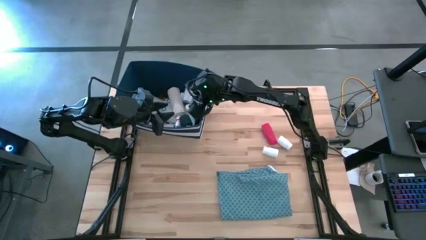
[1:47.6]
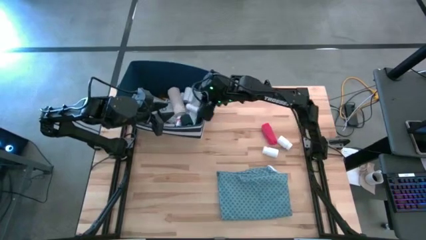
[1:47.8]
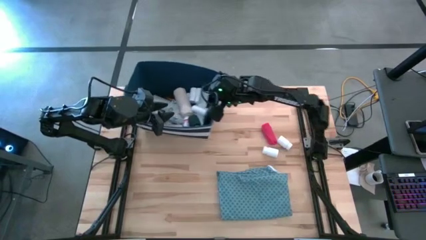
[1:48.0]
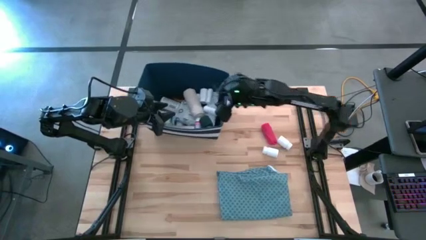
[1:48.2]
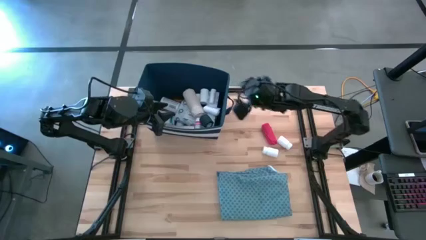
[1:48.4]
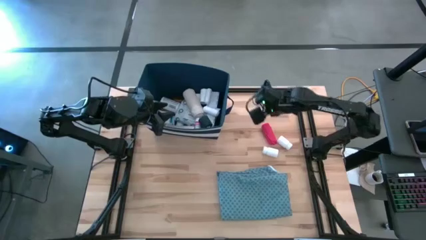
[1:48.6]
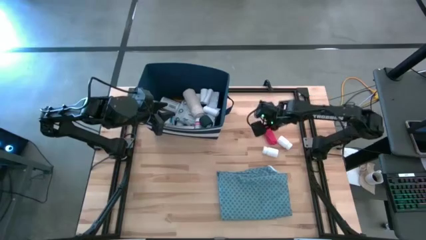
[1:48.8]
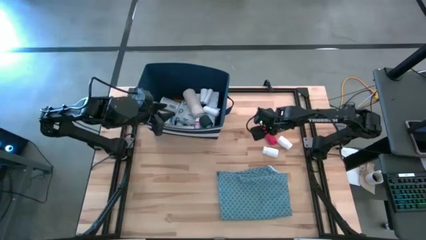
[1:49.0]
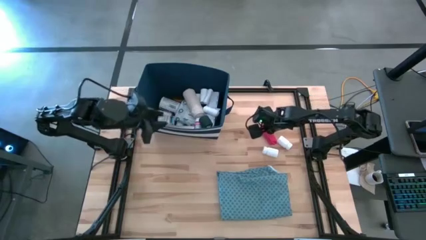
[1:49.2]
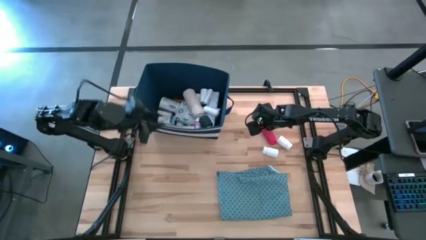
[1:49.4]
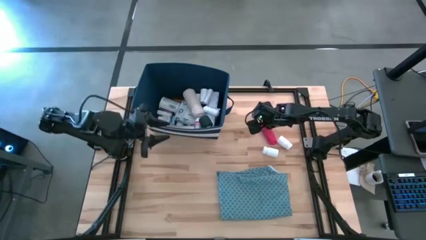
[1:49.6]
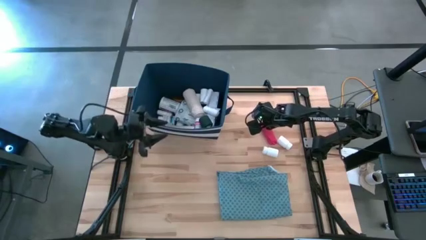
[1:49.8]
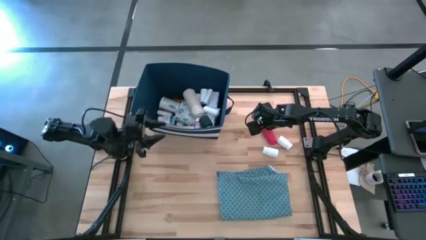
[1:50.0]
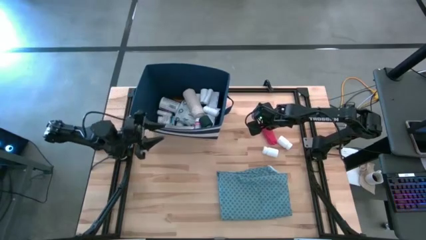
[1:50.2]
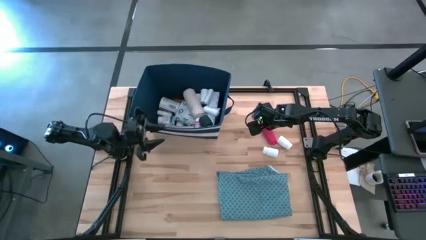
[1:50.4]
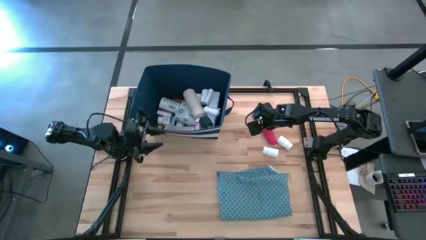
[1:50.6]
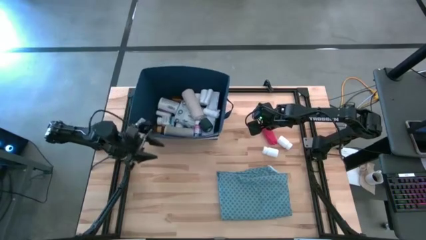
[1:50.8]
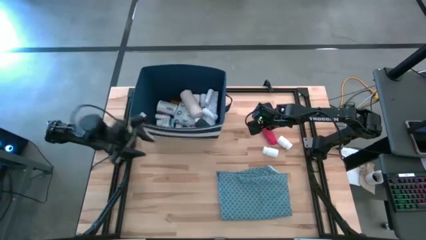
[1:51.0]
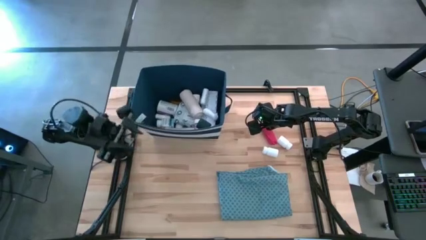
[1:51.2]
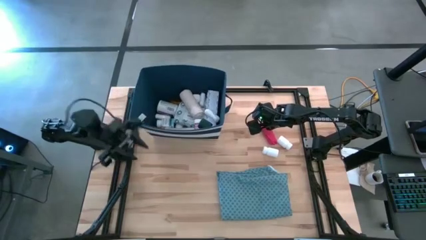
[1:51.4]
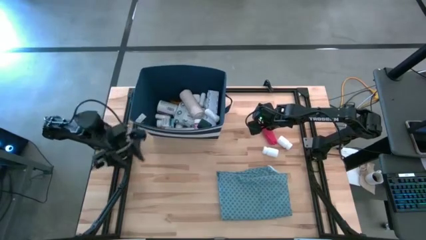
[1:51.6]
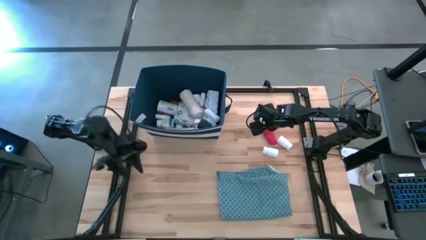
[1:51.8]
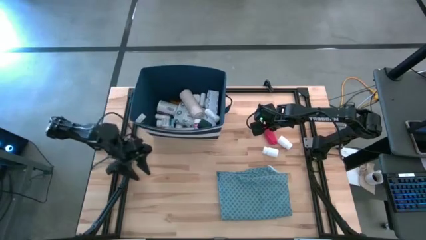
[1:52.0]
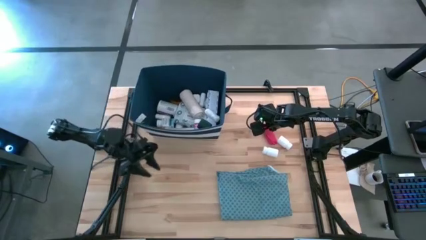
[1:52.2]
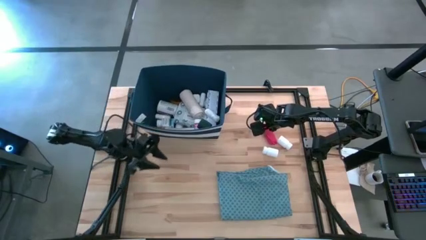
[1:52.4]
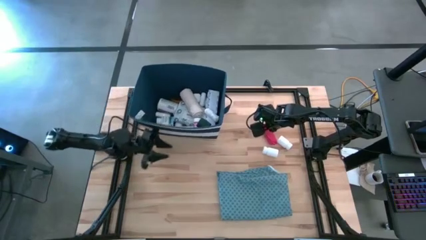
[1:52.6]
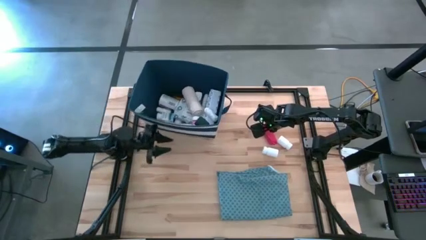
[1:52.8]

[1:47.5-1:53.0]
Task: Pick & place medical supplies in basket/bin
Adjust the blue bin

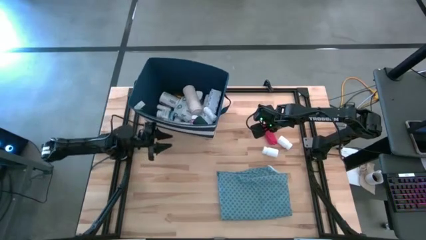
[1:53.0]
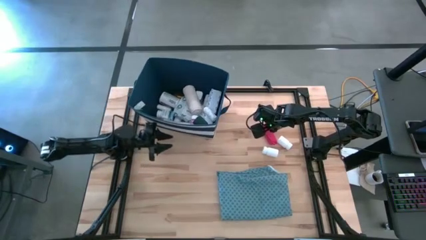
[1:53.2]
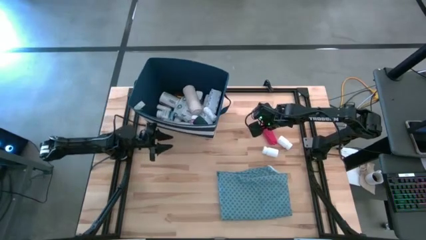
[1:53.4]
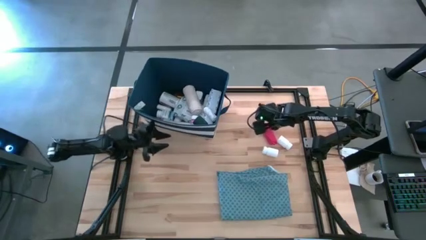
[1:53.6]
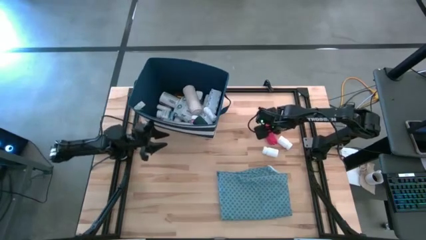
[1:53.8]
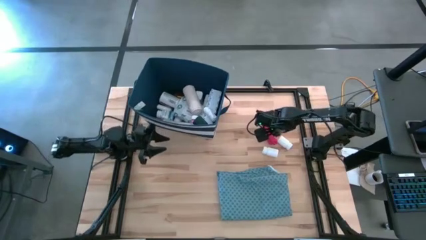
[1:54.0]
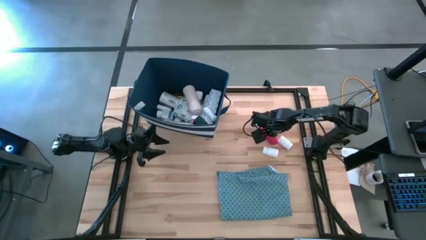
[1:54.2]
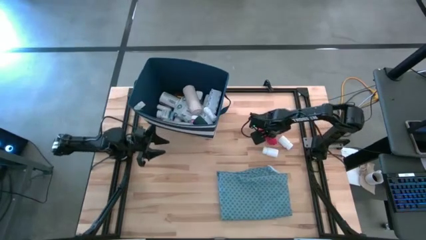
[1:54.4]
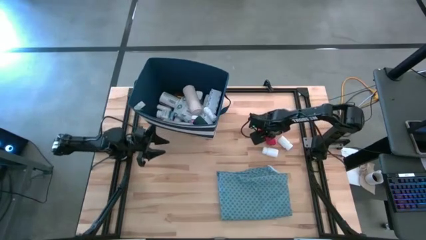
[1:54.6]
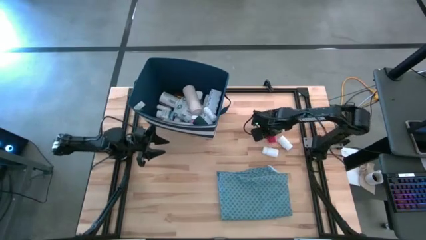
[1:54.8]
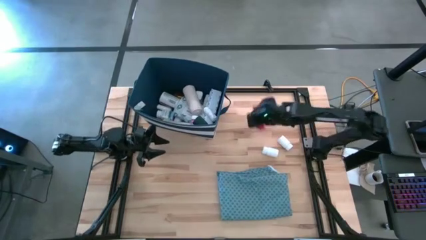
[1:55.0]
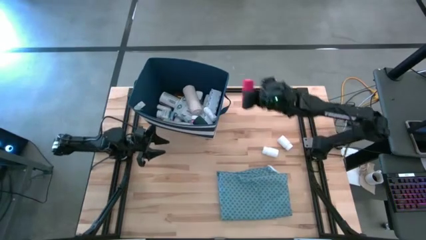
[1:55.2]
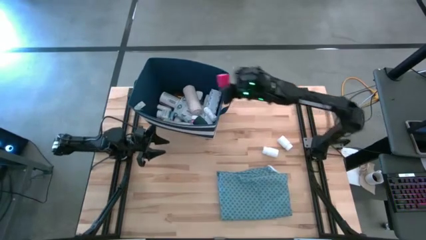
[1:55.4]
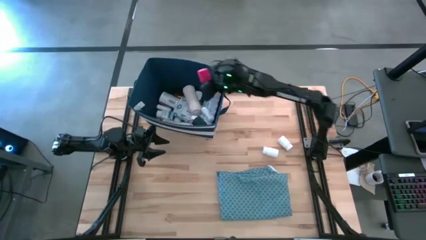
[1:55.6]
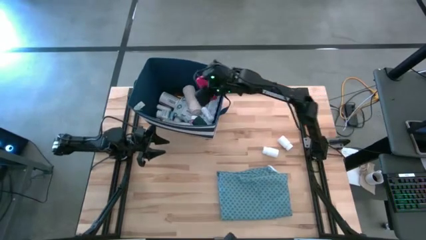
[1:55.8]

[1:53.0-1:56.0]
Put the red bandage into the blue bin

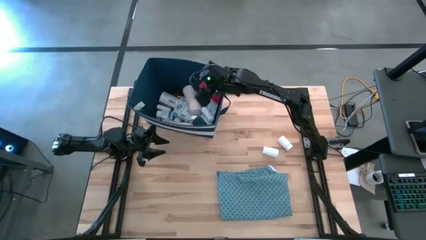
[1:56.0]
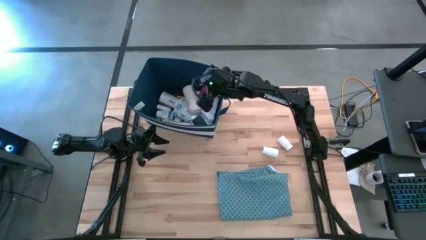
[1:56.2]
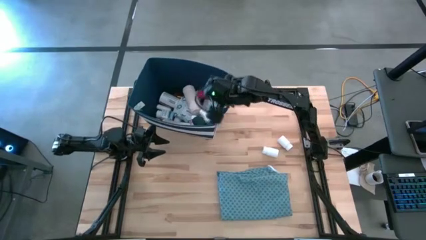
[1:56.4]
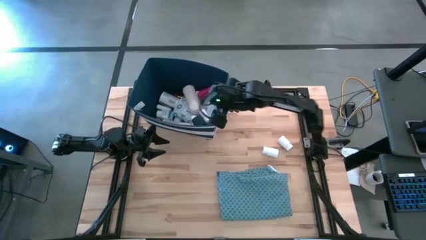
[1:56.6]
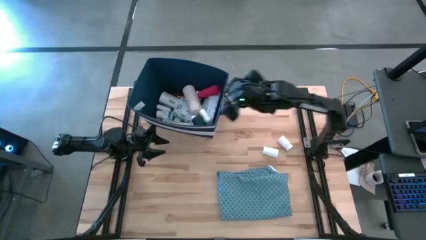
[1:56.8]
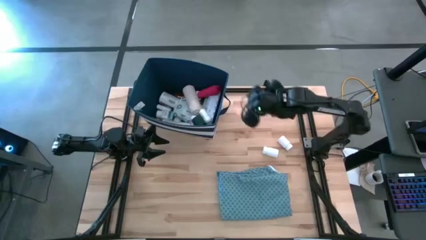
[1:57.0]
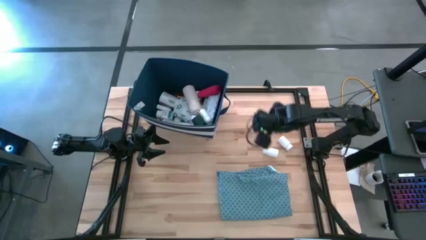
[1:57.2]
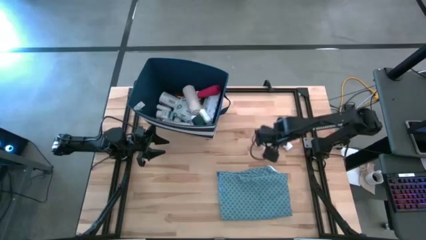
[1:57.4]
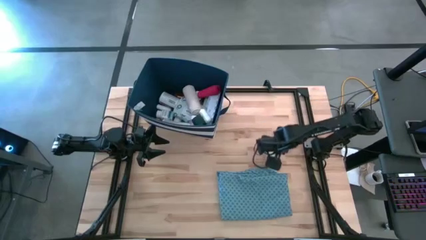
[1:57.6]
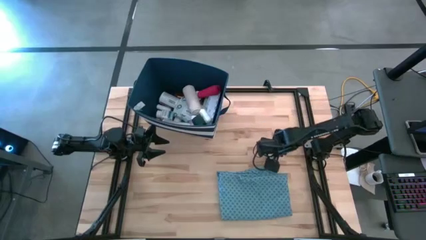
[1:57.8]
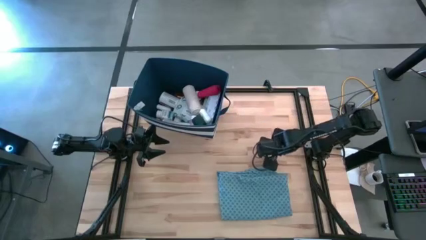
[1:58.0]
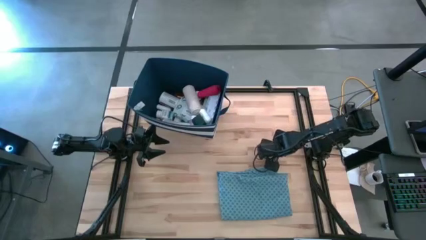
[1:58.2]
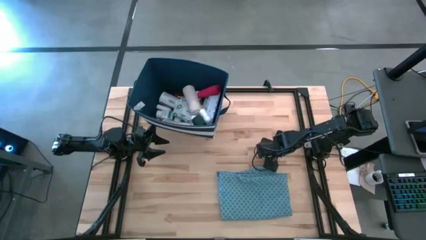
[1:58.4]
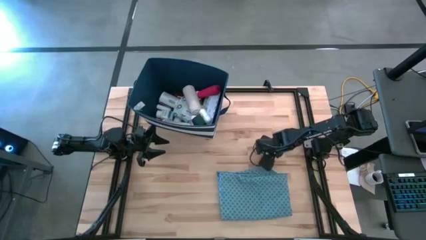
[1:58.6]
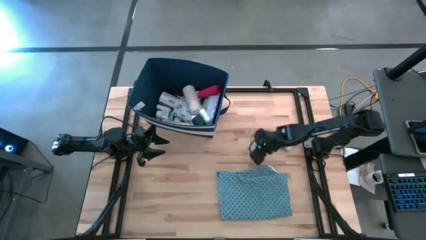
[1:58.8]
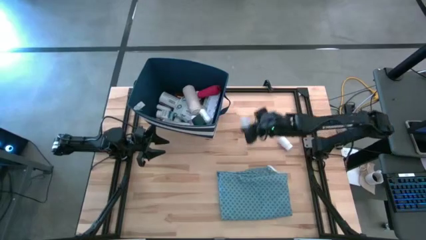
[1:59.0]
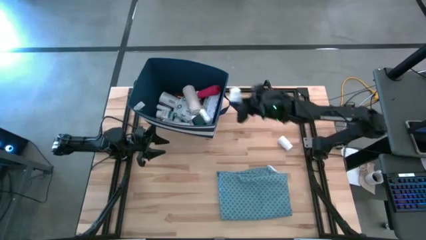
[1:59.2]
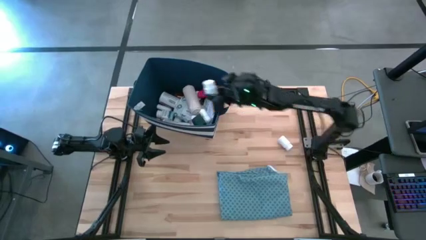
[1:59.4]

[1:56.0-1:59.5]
Put the white medicine bottle into the blue bin

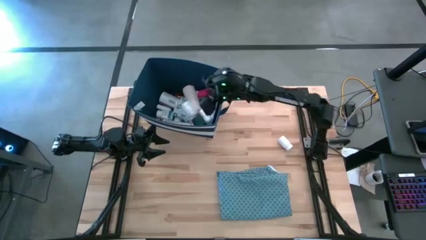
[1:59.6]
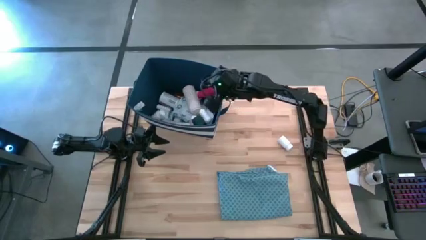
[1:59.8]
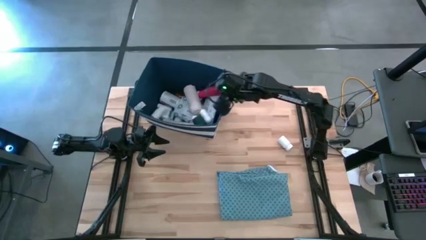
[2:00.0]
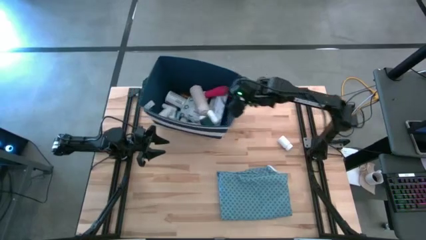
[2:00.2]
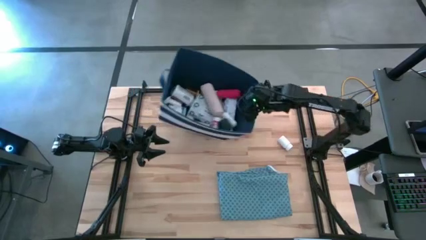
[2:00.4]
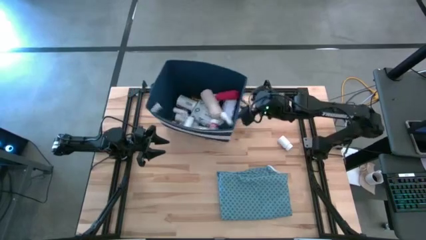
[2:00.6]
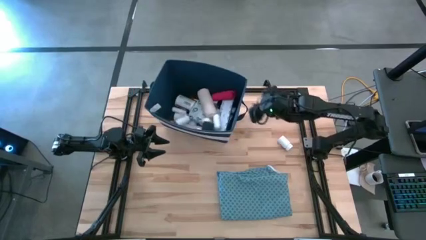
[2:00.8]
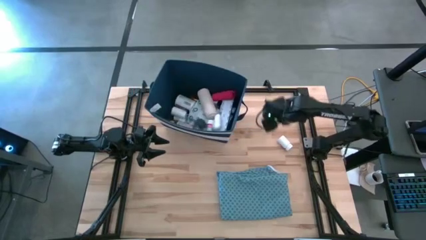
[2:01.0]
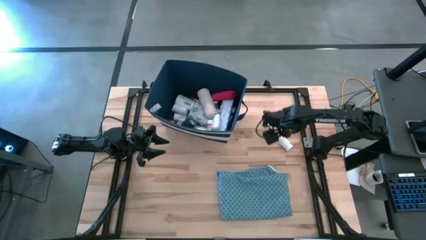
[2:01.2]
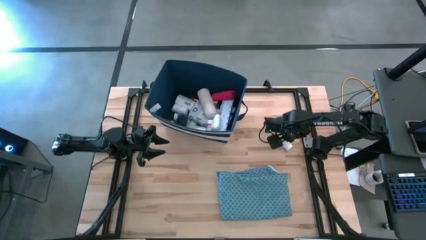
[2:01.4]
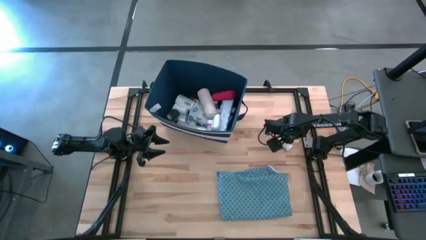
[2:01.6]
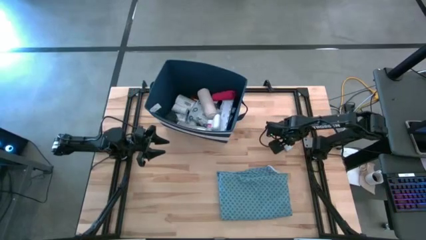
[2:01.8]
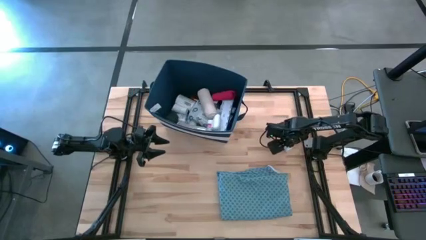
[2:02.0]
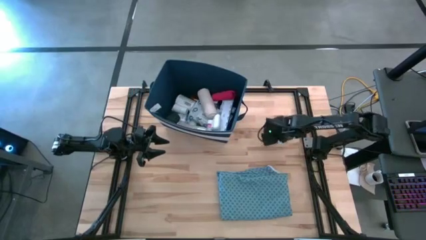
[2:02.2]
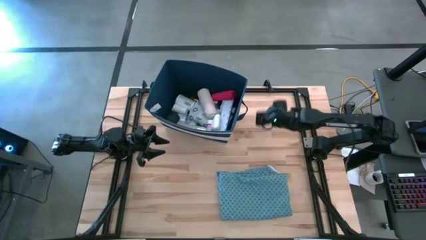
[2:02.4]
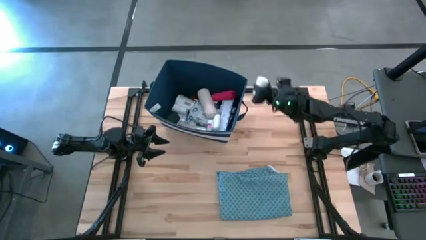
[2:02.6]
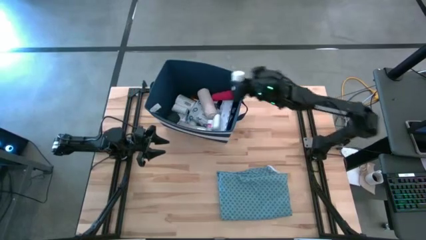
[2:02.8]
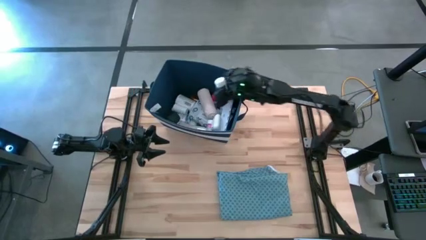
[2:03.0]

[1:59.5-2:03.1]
Put the white medicine bottle into the blue bin

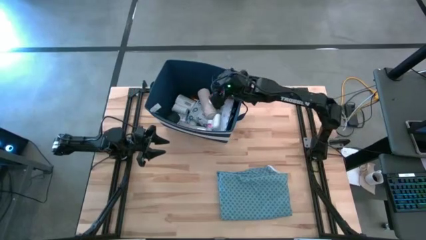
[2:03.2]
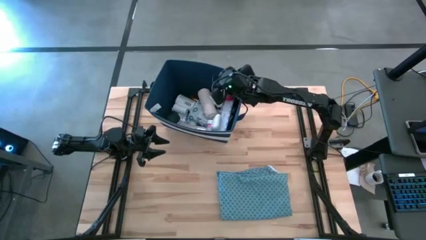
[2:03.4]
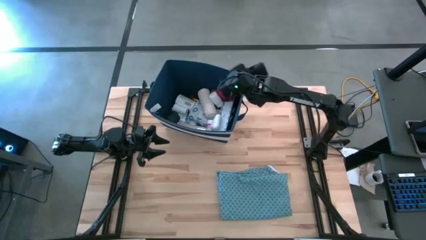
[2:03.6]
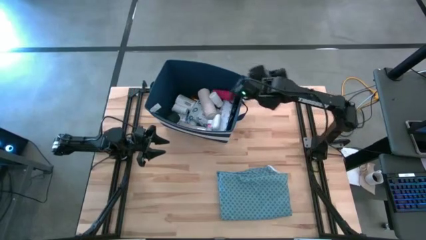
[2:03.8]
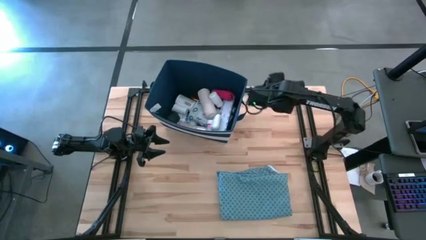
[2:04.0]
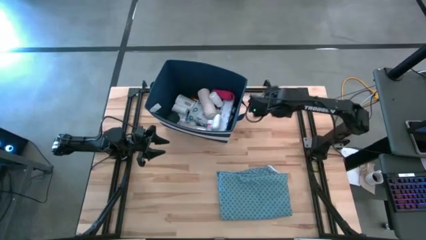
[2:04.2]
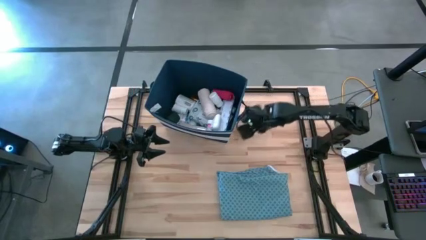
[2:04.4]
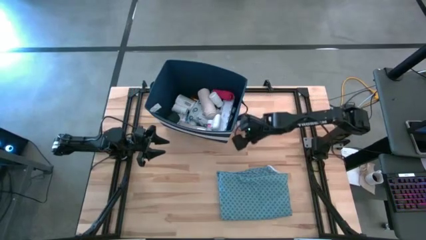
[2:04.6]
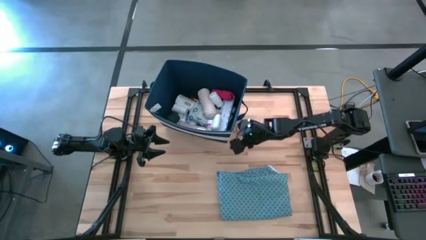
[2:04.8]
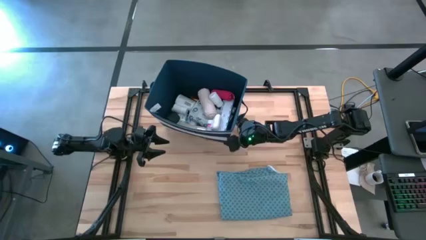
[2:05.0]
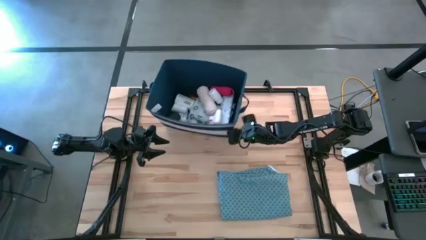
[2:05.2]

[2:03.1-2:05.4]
Adjust the blue bin
